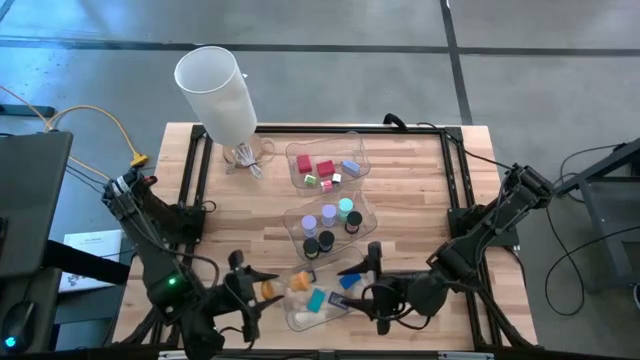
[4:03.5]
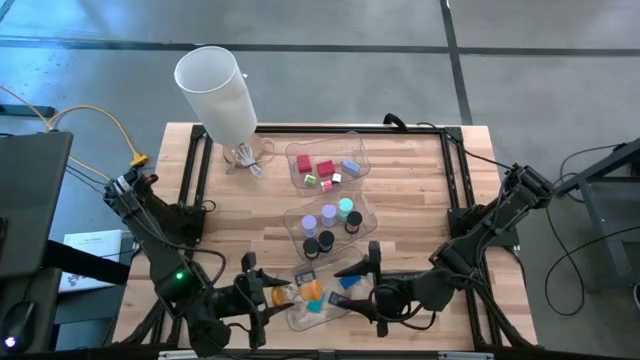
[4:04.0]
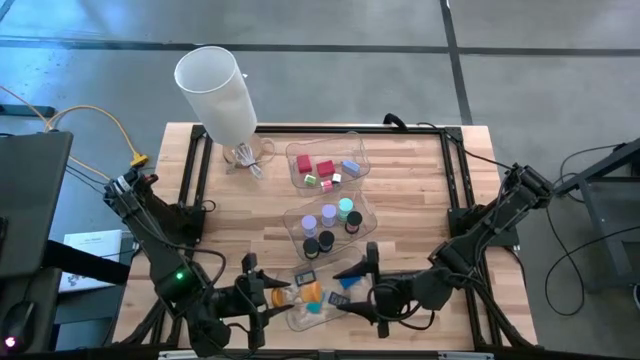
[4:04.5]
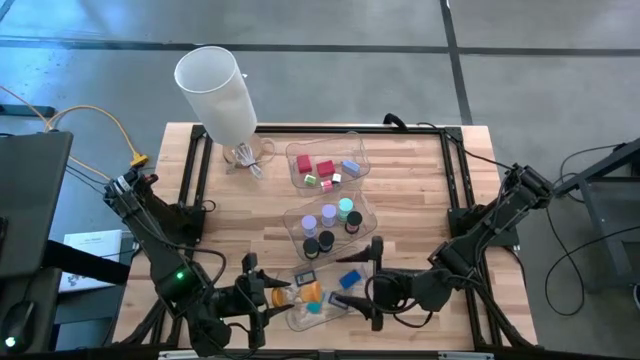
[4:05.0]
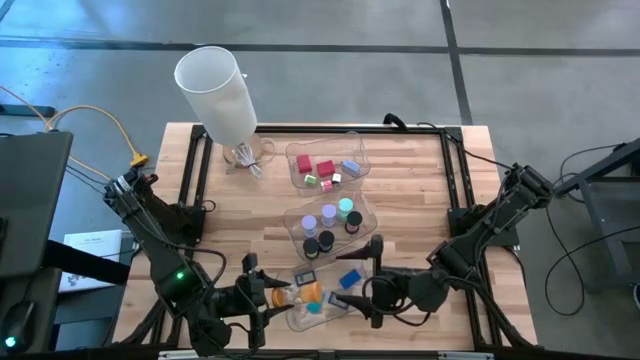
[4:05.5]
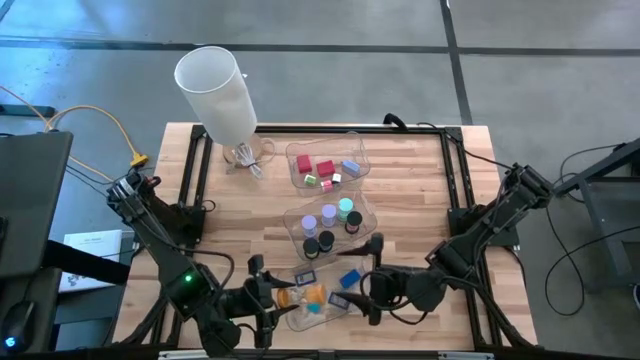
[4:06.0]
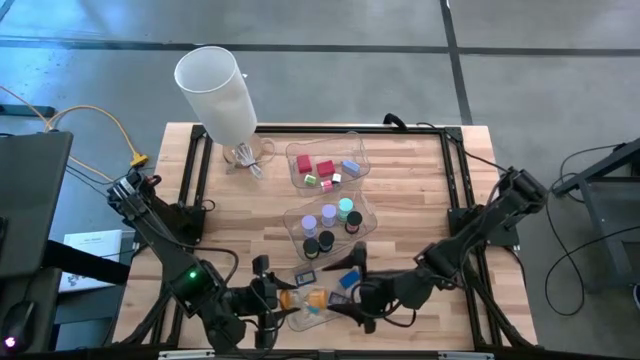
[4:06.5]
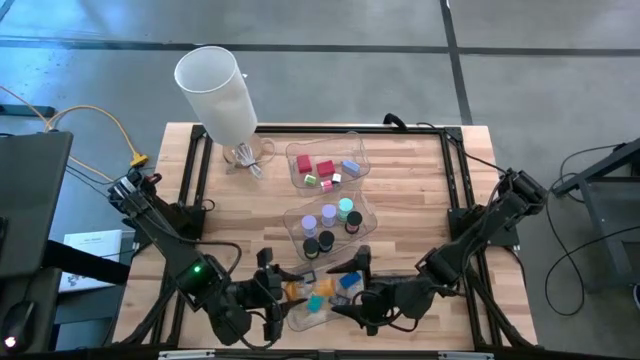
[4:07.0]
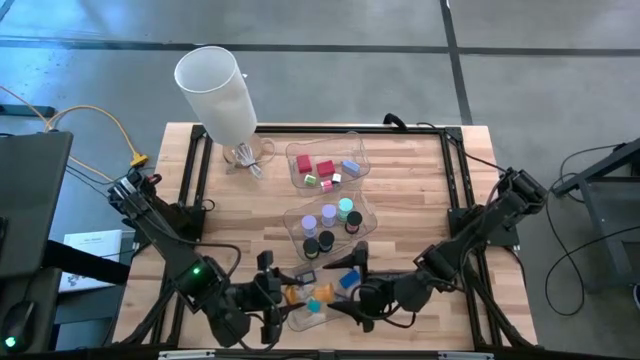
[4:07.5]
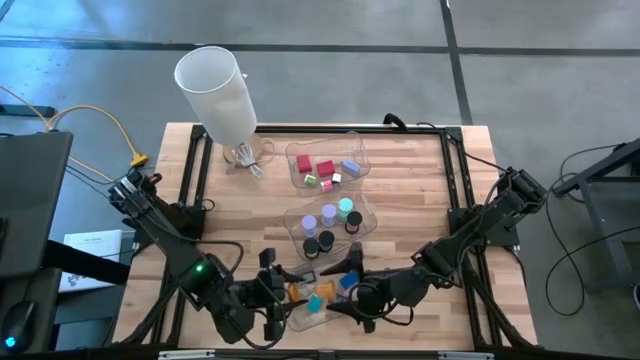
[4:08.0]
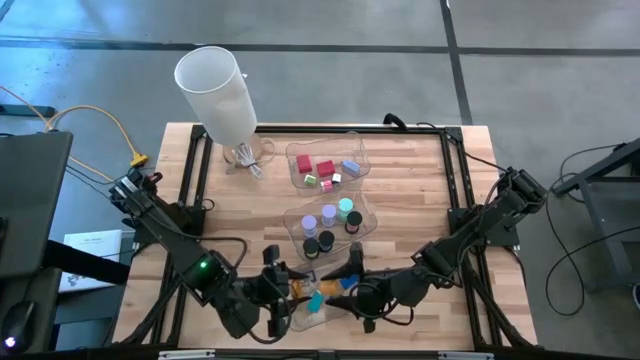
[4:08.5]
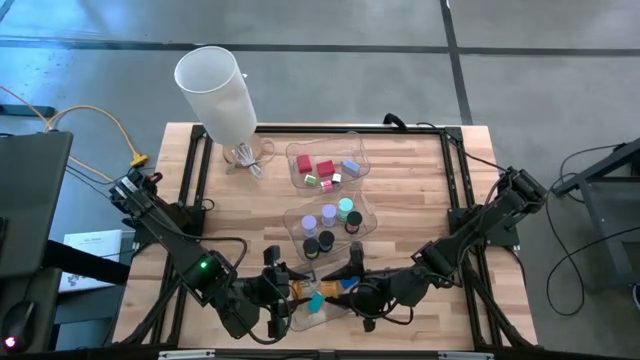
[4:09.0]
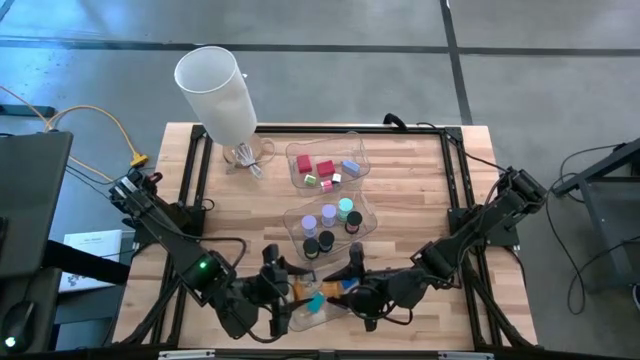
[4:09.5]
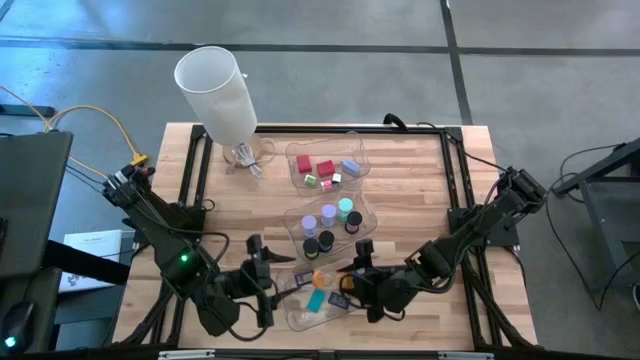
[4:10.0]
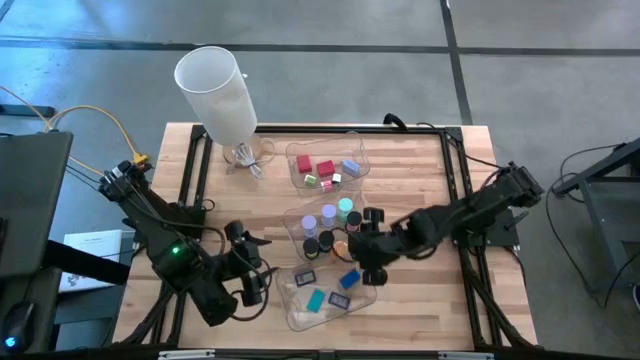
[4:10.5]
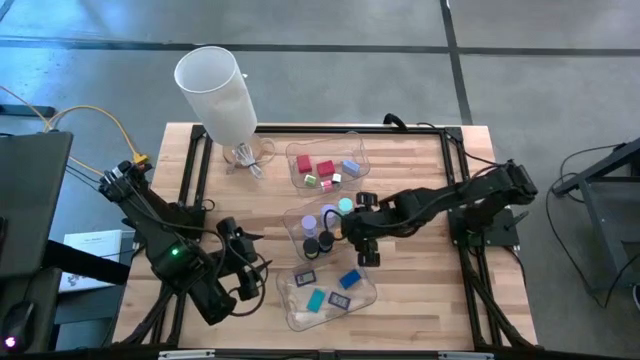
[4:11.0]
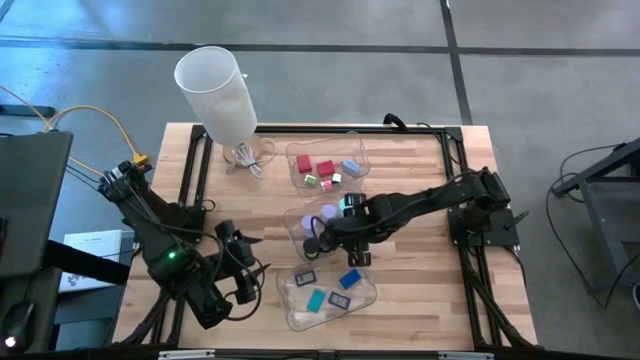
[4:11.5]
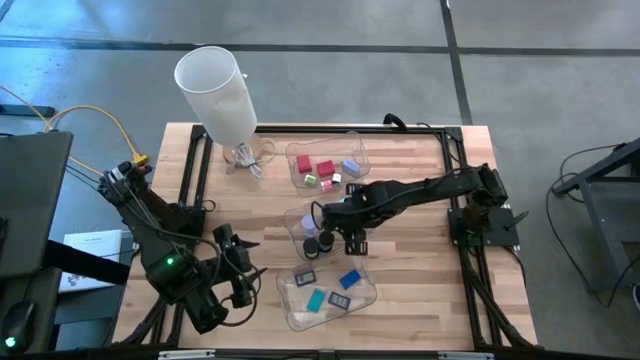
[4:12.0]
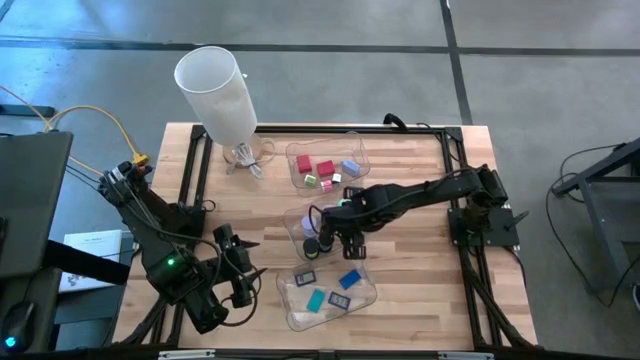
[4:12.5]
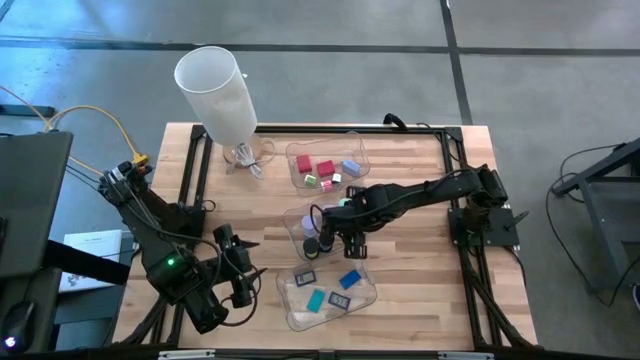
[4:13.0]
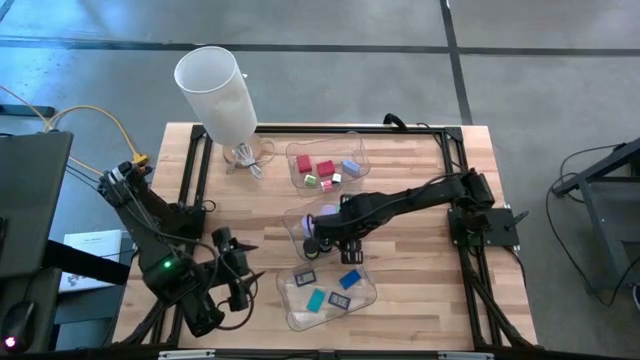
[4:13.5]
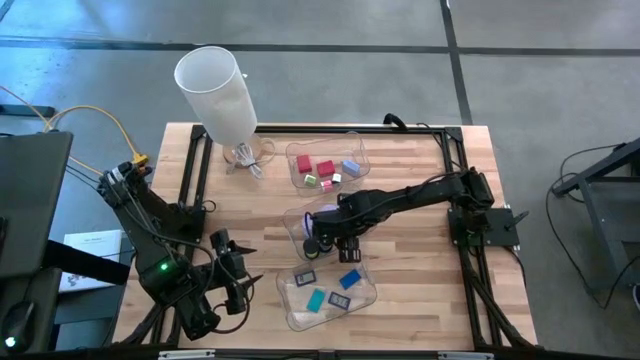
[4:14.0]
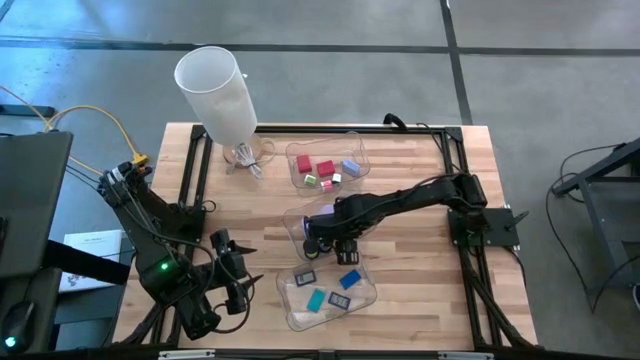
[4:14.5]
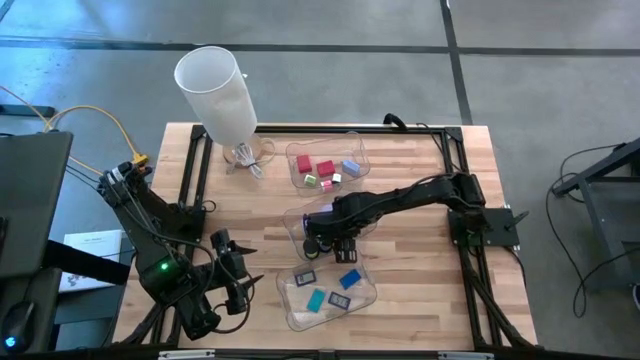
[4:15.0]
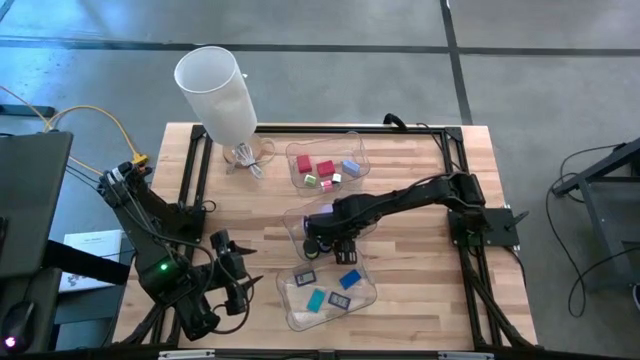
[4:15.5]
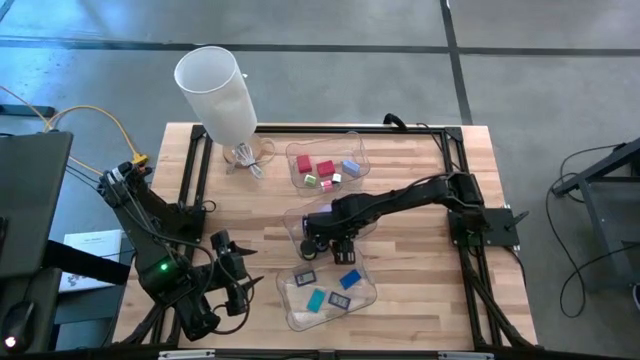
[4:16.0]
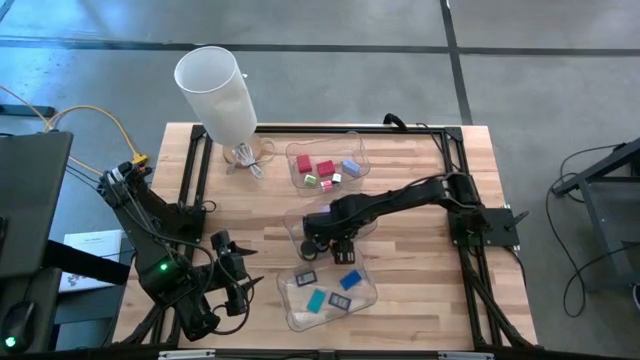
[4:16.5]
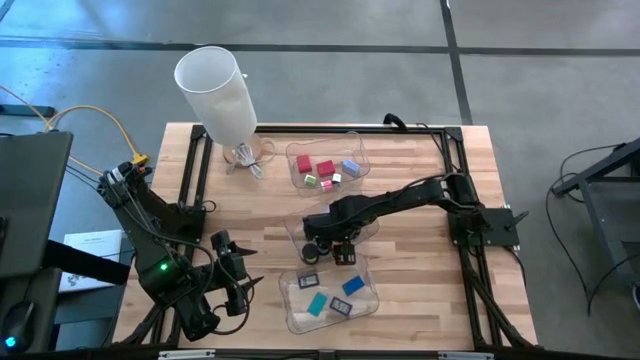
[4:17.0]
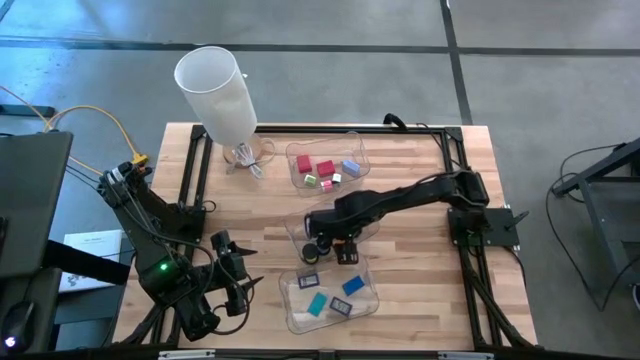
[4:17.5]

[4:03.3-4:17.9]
Task: Pick & Place Office items
Put the yellow hourglass into the middle transparent bin

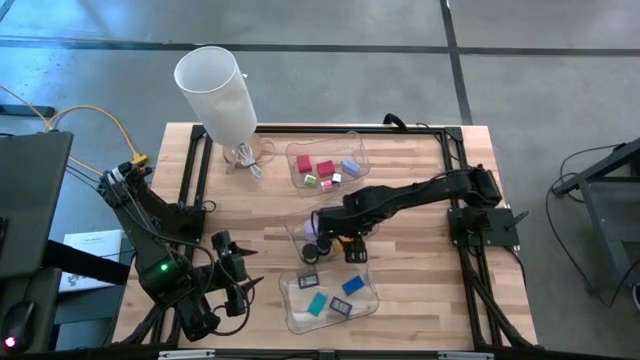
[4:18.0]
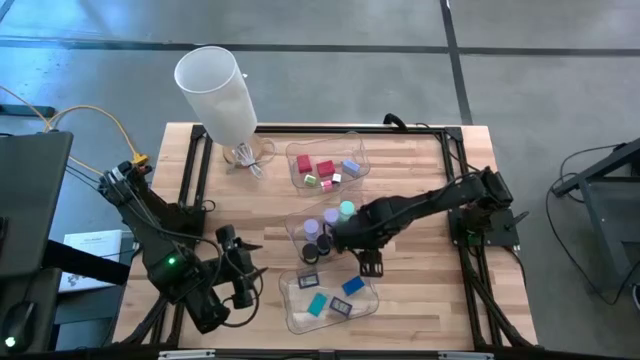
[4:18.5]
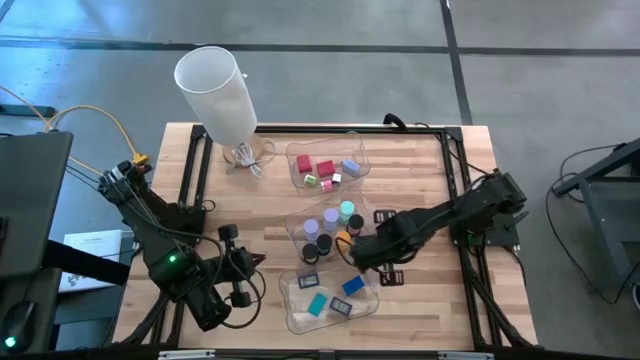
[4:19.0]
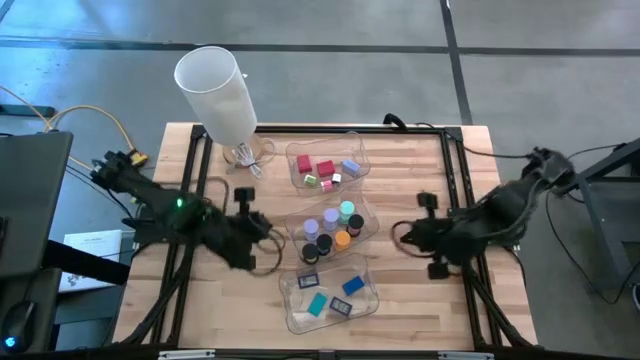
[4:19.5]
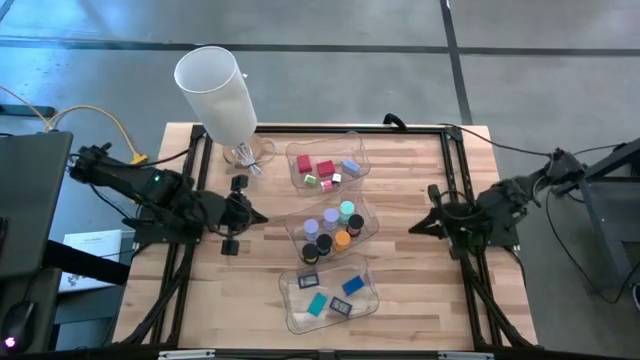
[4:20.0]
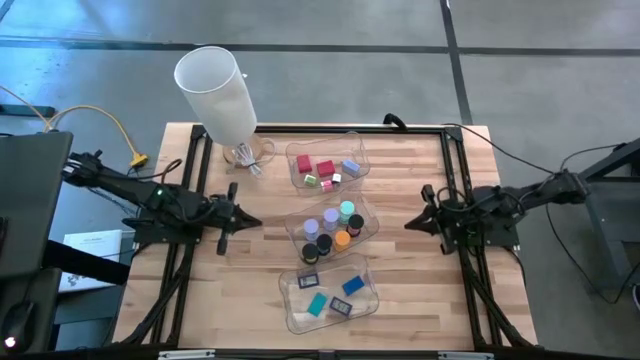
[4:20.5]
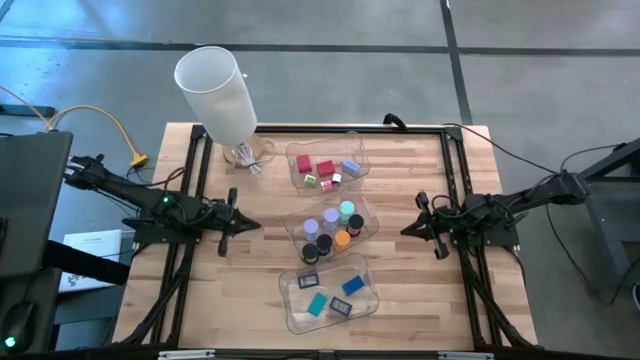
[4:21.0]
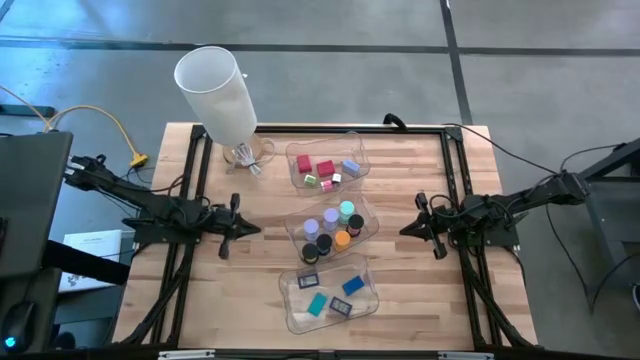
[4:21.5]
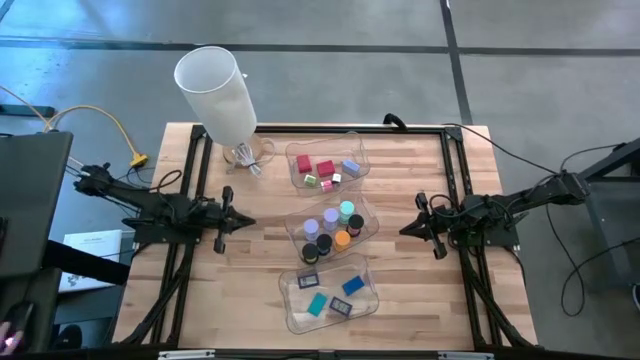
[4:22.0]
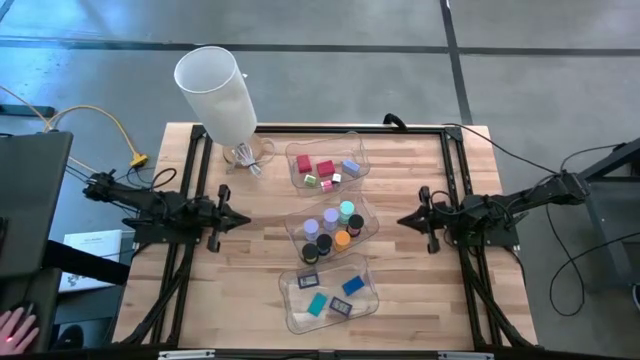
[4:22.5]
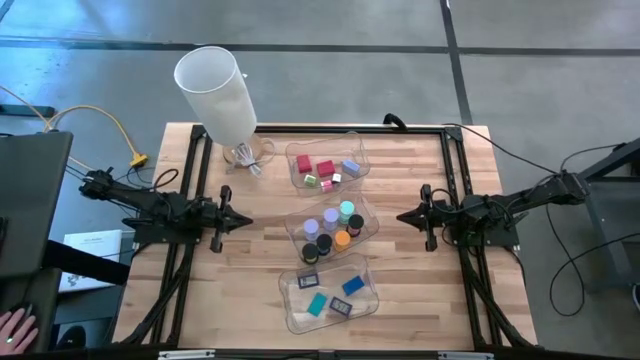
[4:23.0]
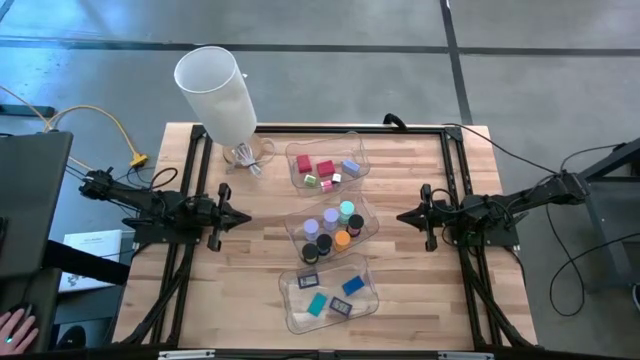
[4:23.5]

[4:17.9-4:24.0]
Return to Home Position

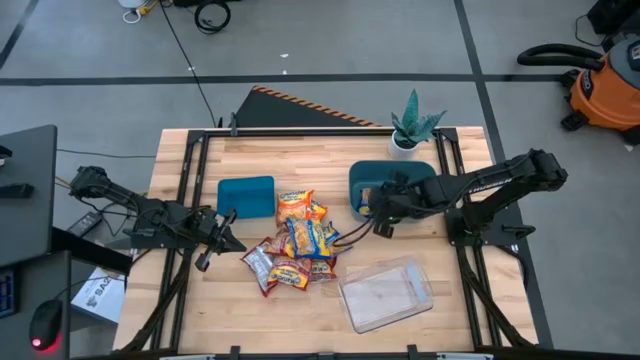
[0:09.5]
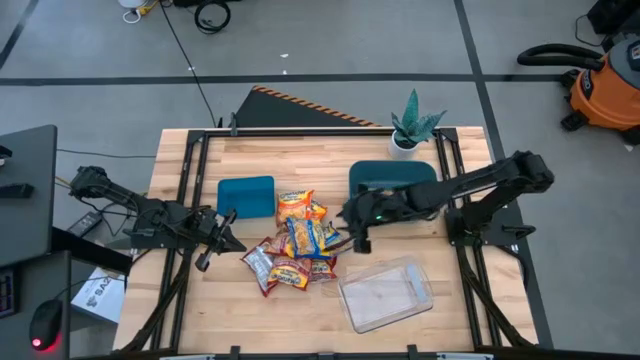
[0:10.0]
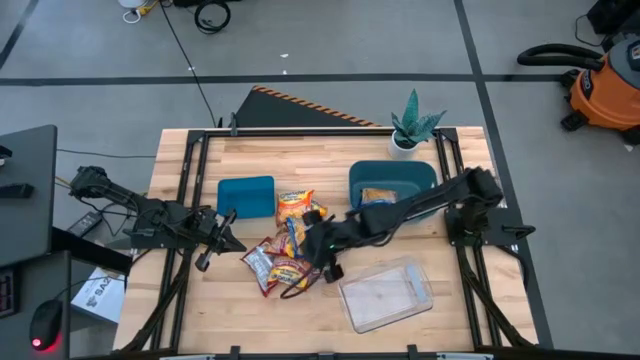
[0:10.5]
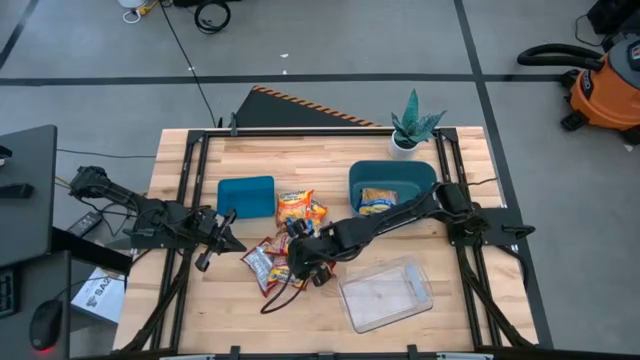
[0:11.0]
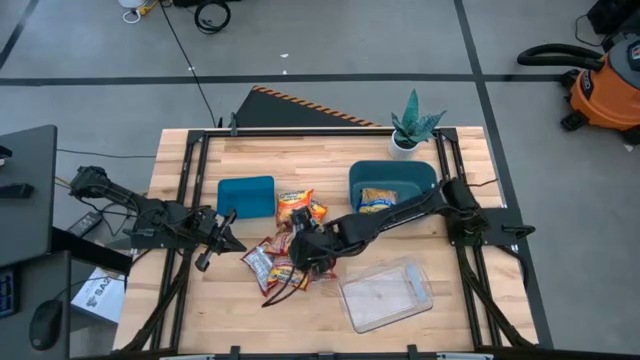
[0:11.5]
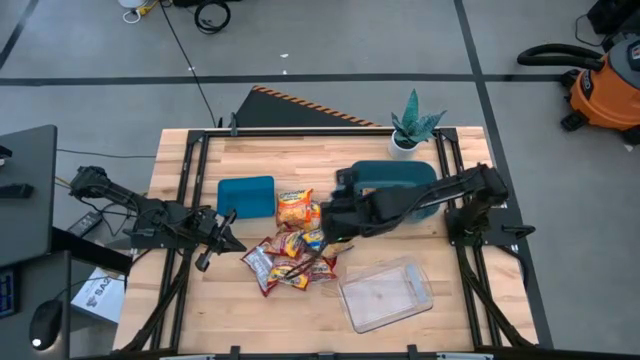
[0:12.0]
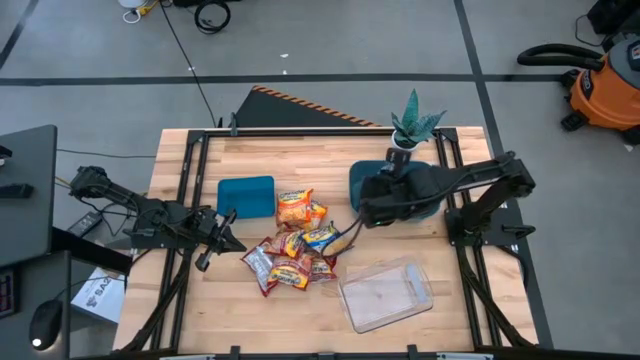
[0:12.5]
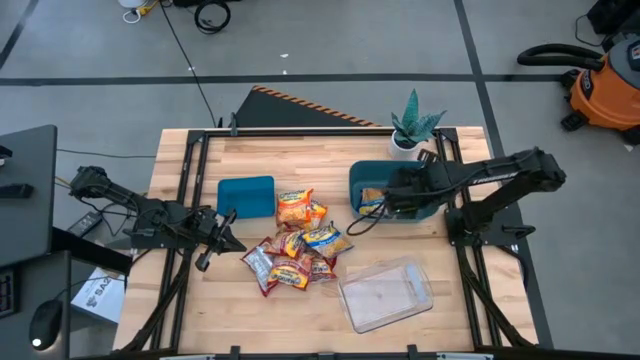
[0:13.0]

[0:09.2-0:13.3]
Task: Sort Maruchan noodles
Put the blue noodle pack into the green bin
